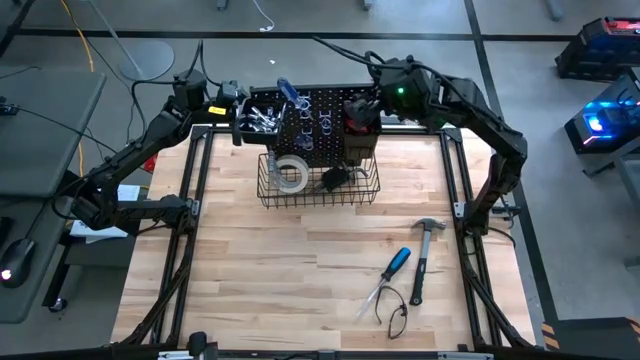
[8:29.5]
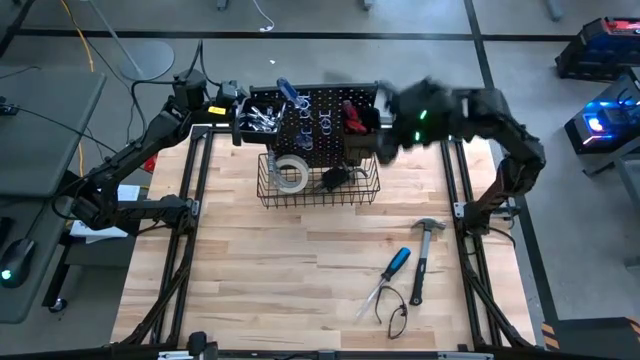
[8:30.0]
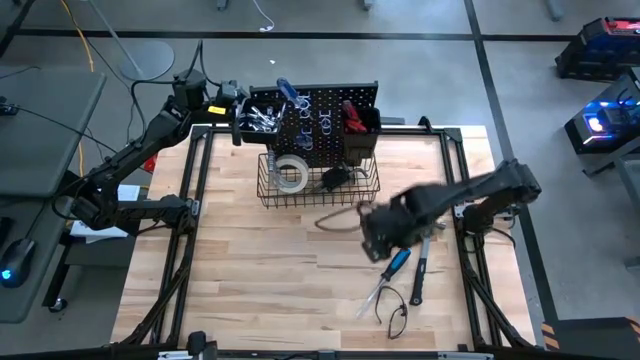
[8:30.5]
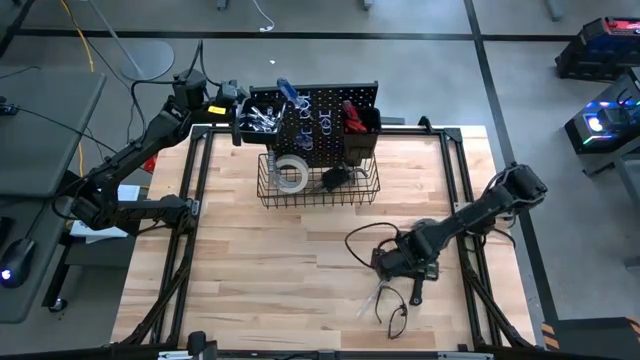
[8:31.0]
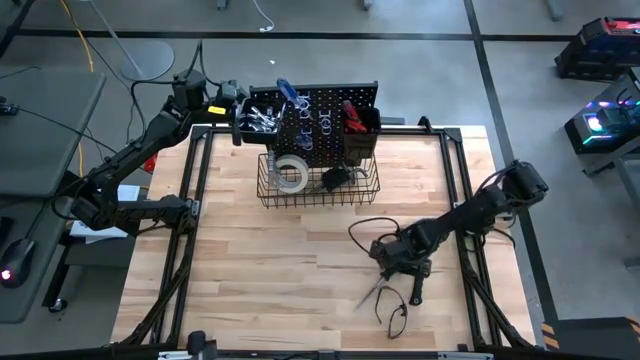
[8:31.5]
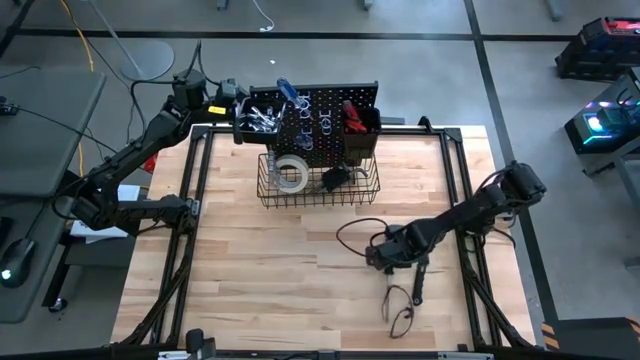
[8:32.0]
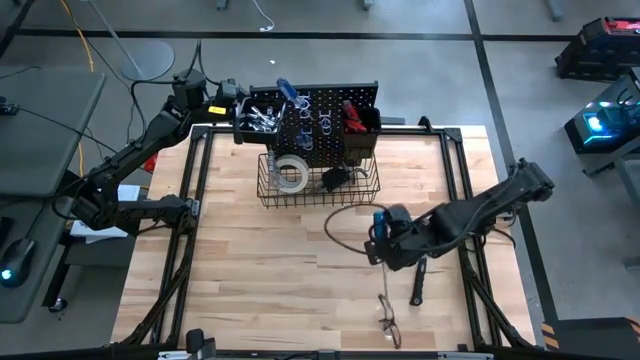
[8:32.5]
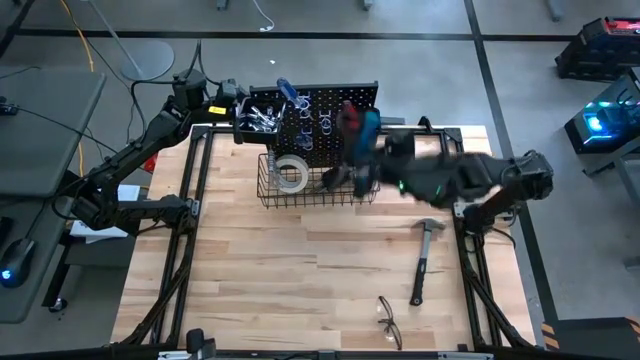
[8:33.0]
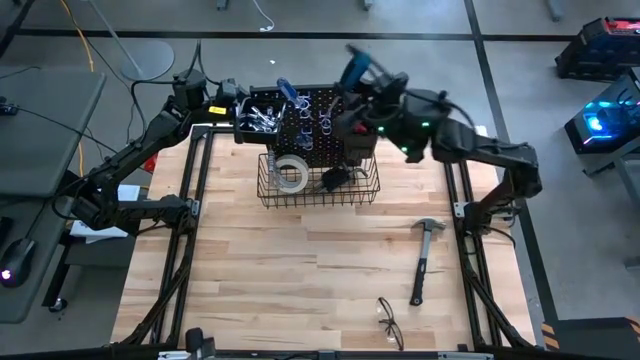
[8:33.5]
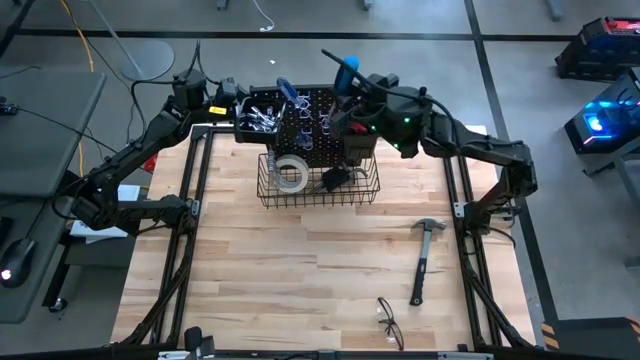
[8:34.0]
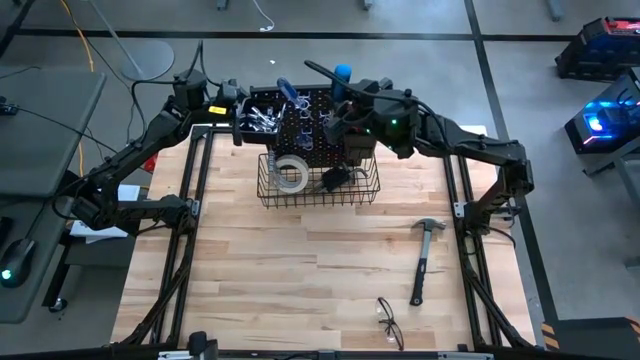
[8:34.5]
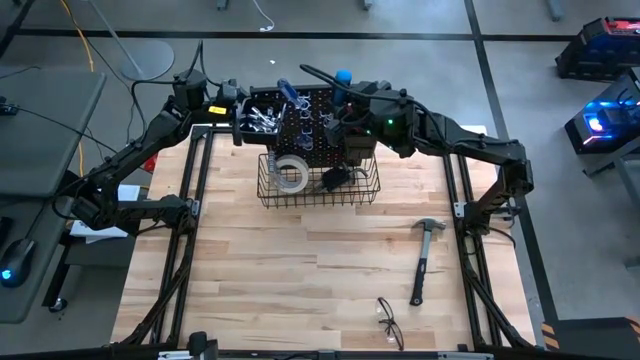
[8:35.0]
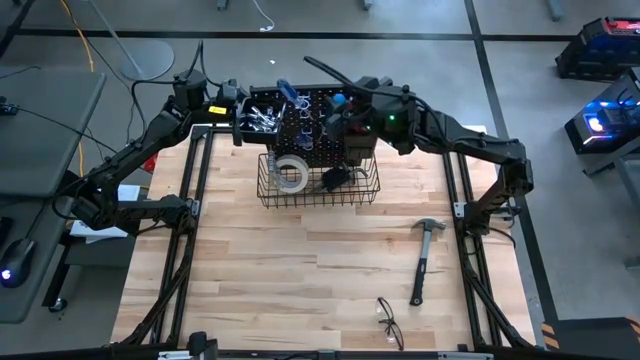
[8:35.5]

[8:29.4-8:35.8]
Task: Hang tools onto peg board
Hang the blue screwdriver on the peg board

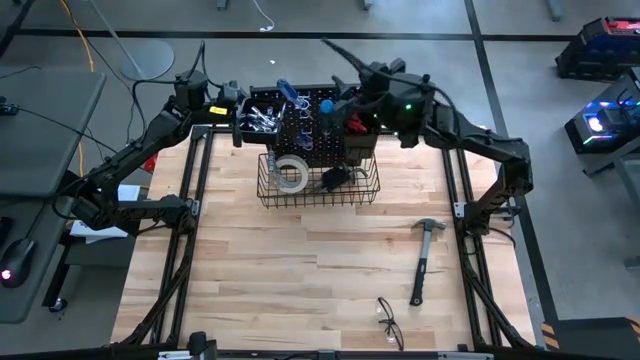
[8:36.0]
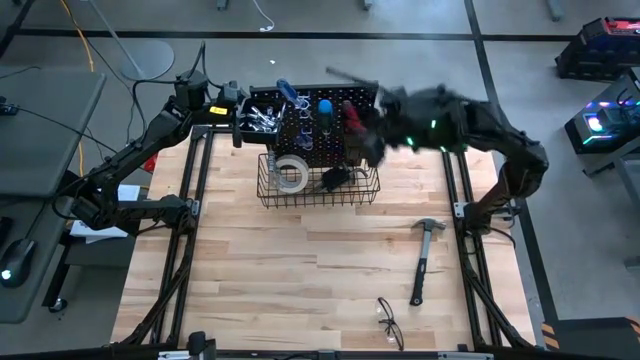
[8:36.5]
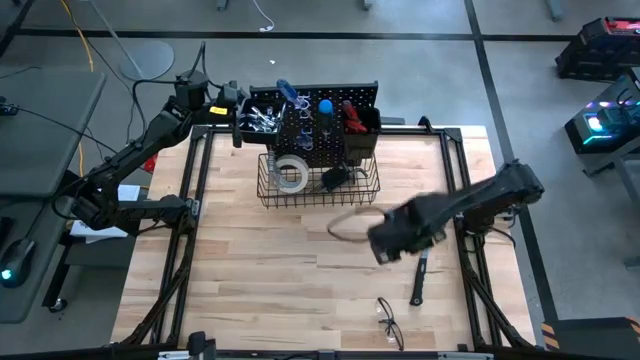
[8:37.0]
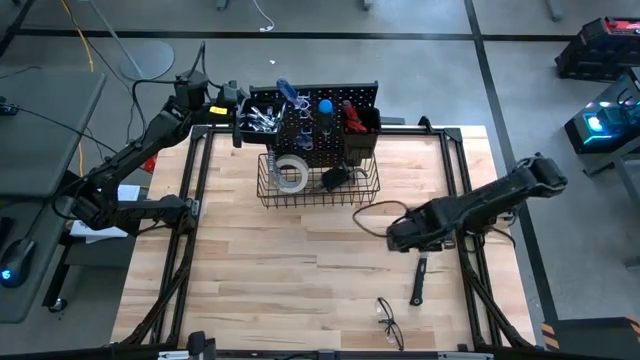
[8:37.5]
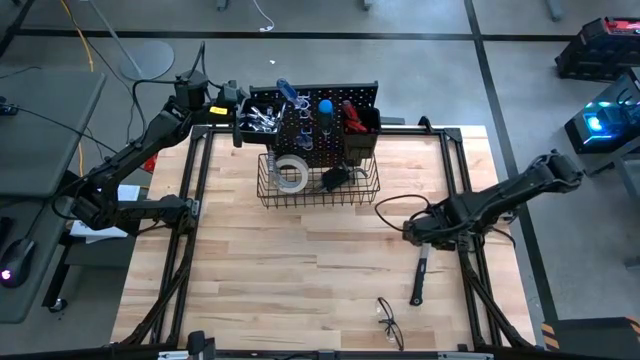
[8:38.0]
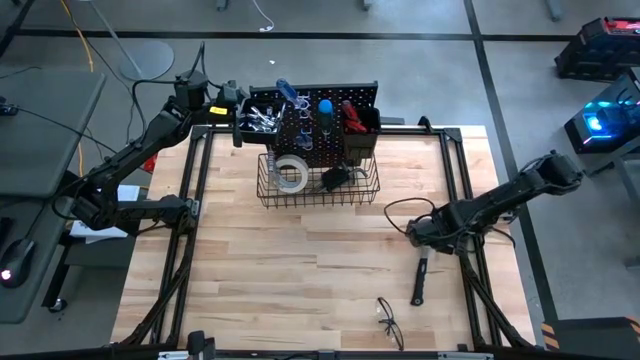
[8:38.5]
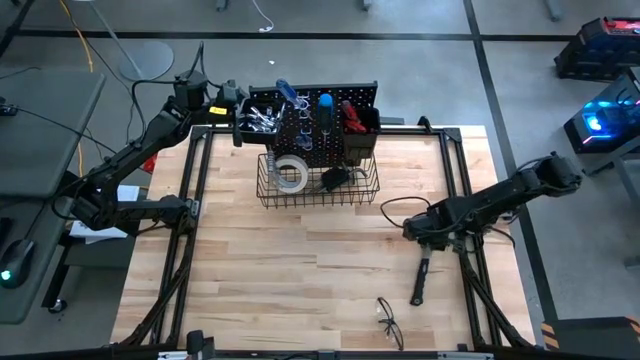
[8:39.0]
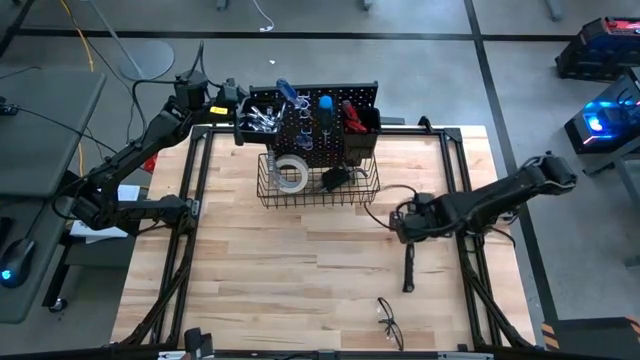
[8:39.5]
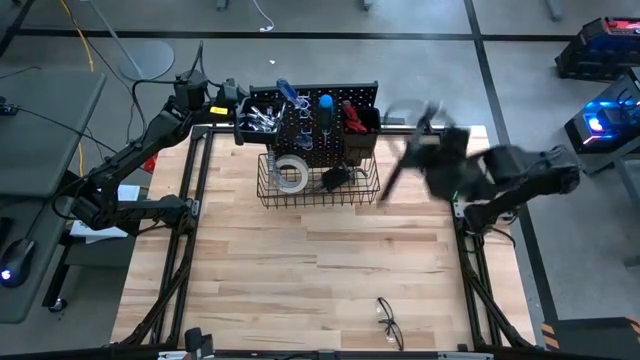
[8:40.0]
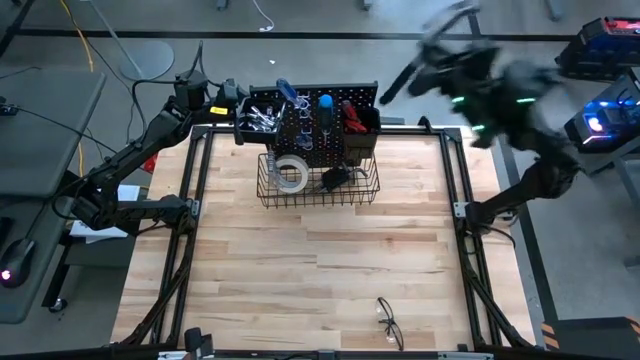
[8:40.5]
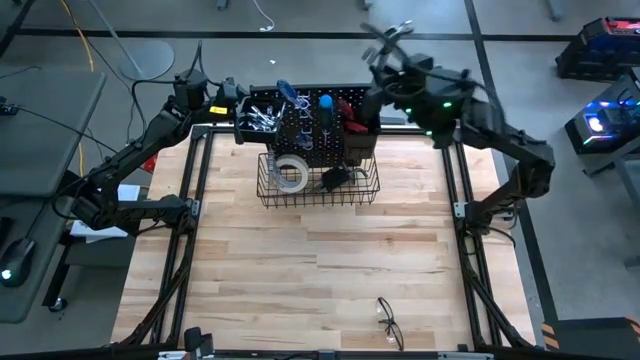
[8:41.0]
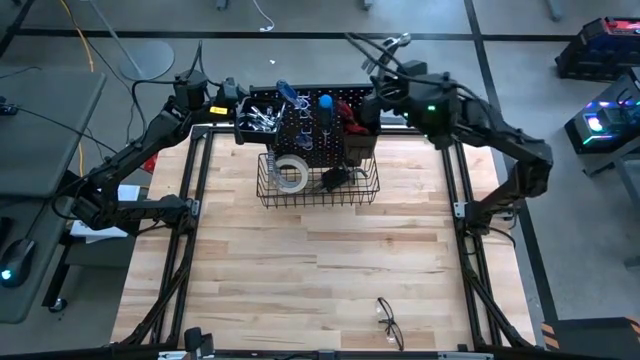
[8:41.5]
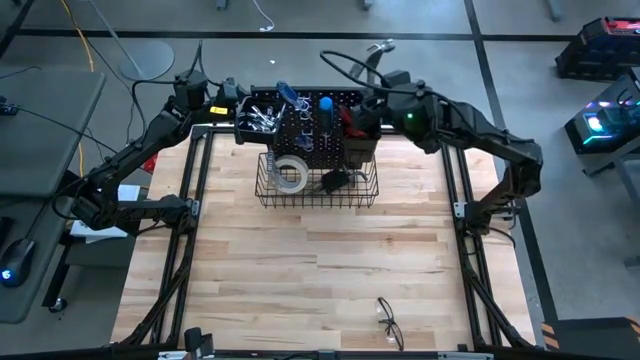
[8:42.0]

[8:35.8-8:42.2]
Put the hammer in the right black bin on the pegboard

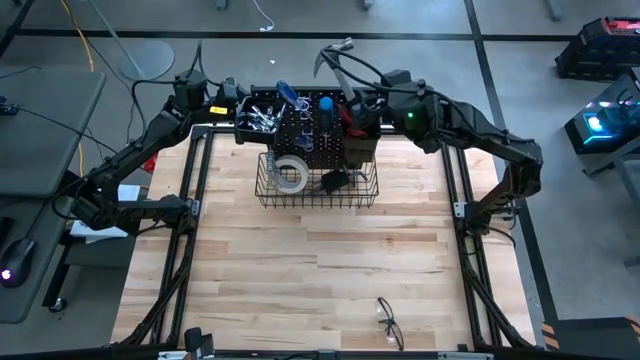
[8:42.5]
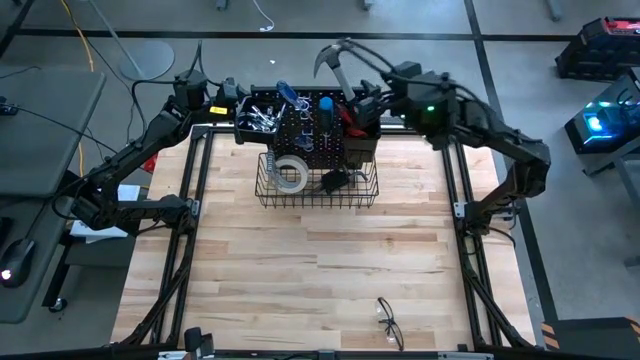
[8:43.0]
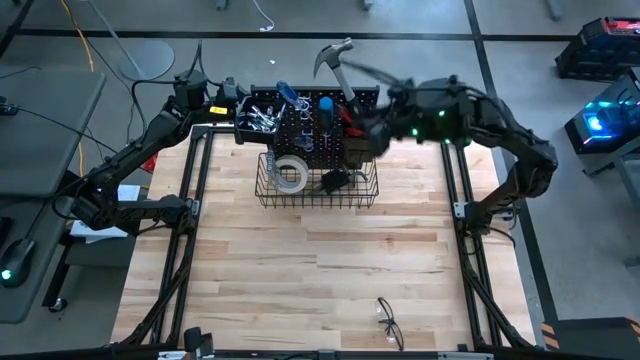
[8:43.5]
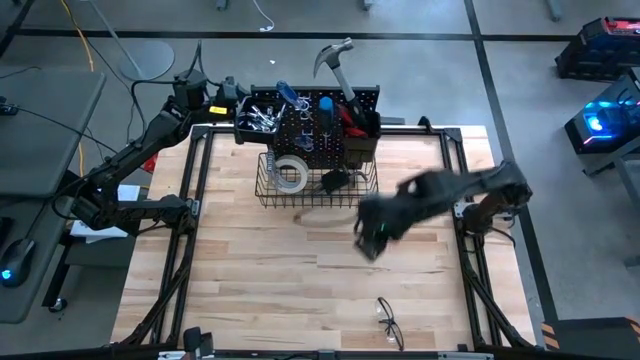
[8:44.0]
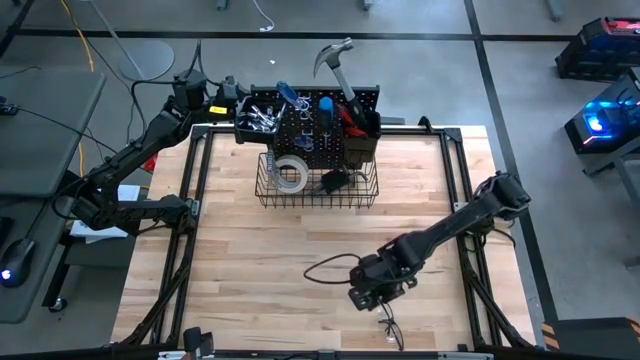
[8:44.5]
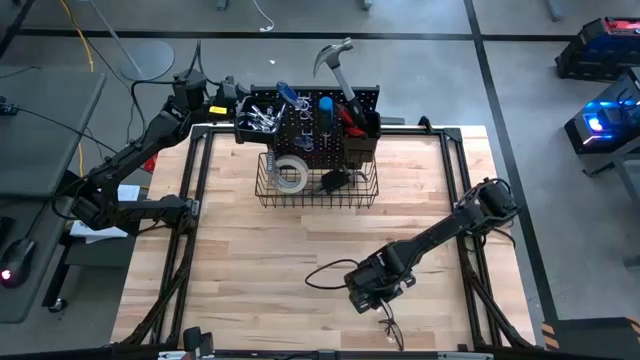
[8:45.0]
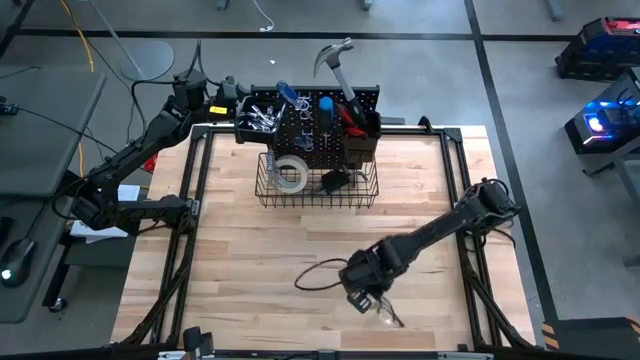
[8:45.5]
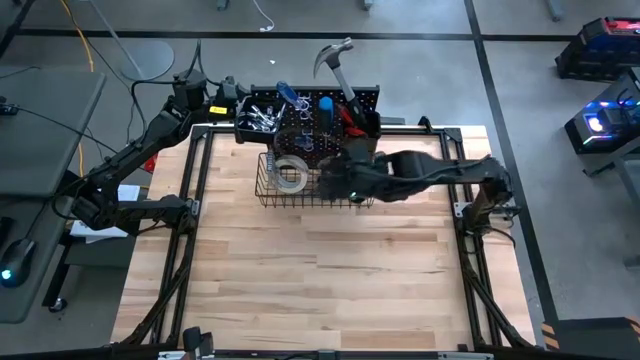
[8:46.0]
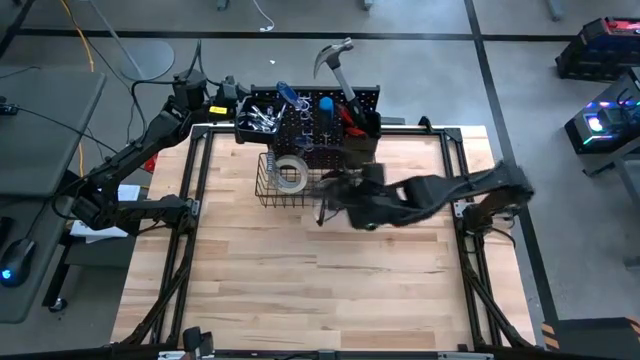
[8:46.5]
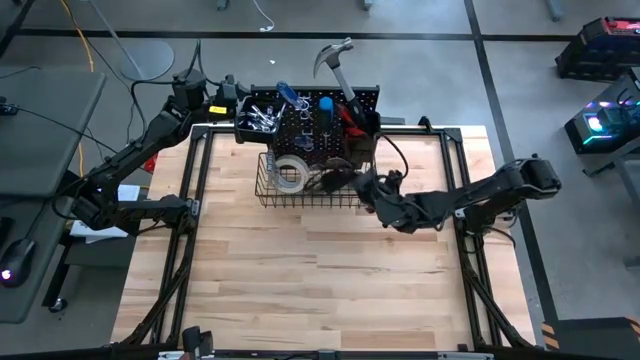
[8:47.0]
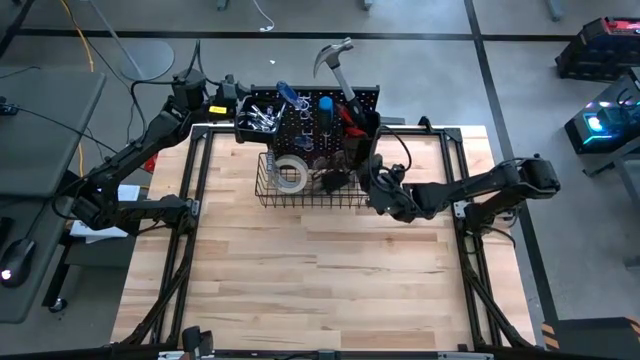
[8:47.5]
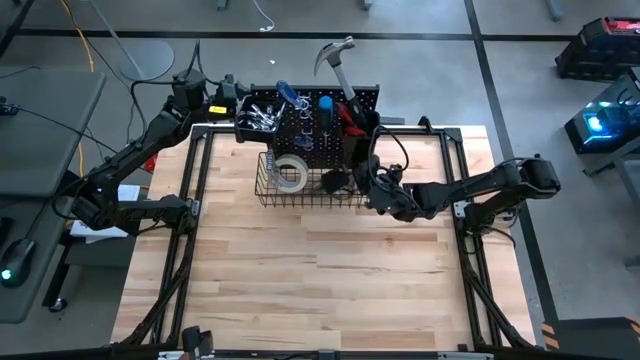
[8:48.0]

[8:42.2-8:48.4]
Put the safety glasses in the wire basket on the pegboard

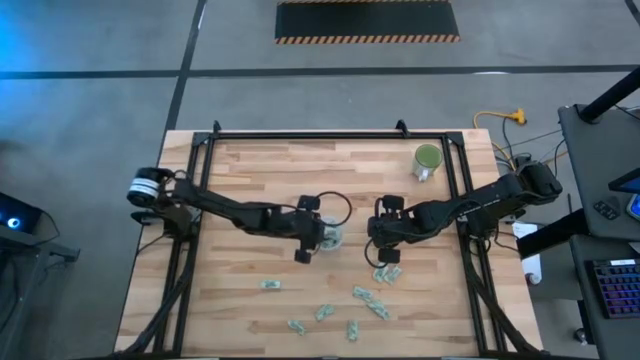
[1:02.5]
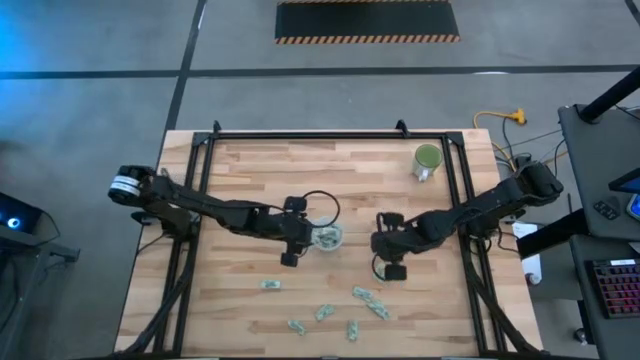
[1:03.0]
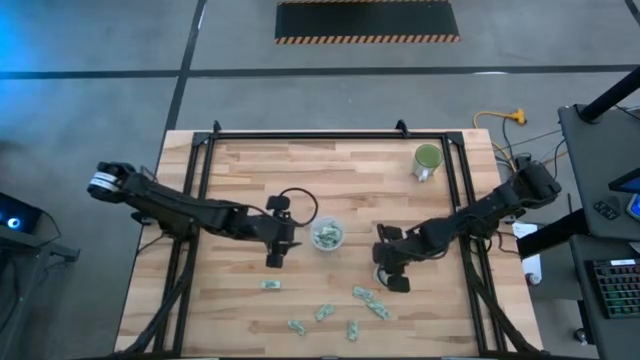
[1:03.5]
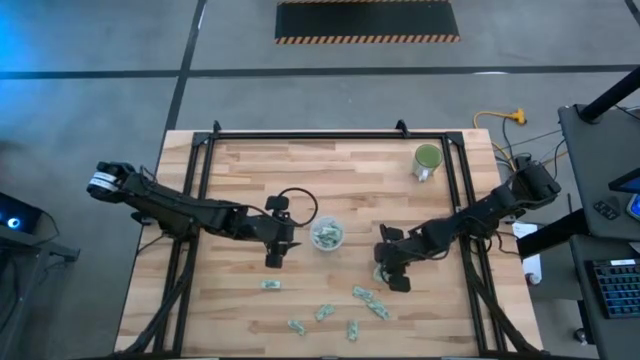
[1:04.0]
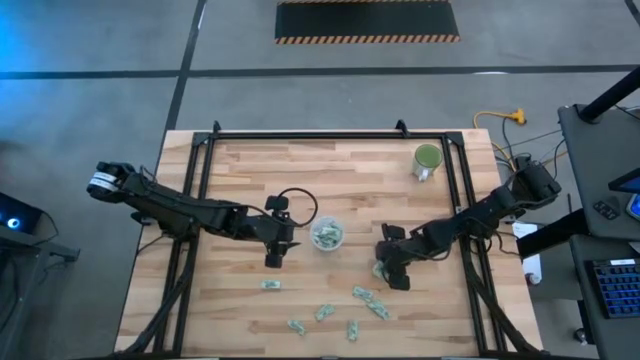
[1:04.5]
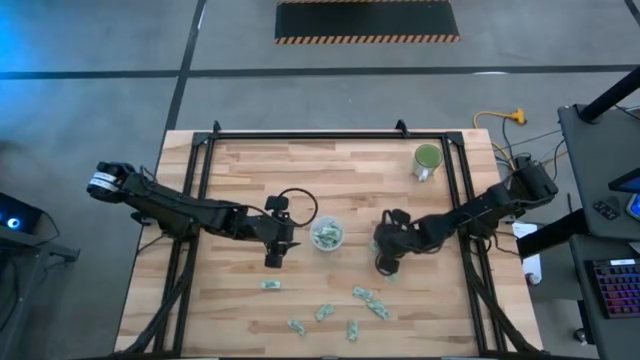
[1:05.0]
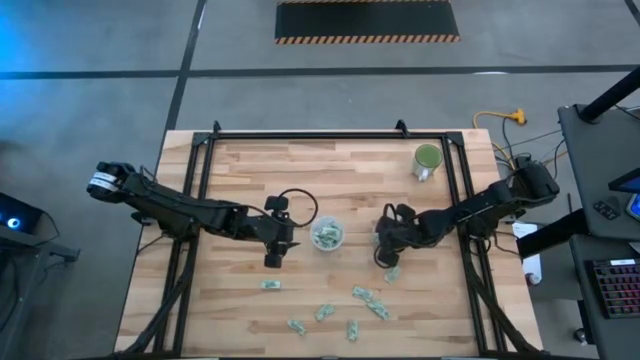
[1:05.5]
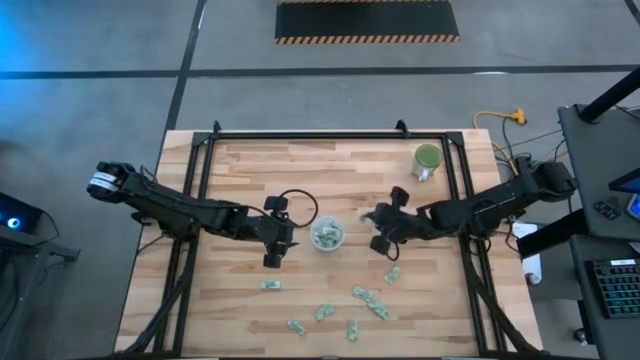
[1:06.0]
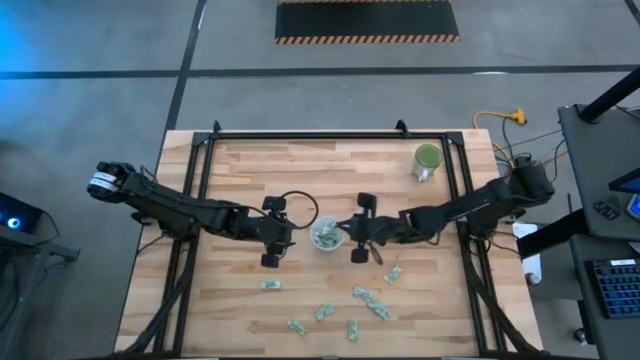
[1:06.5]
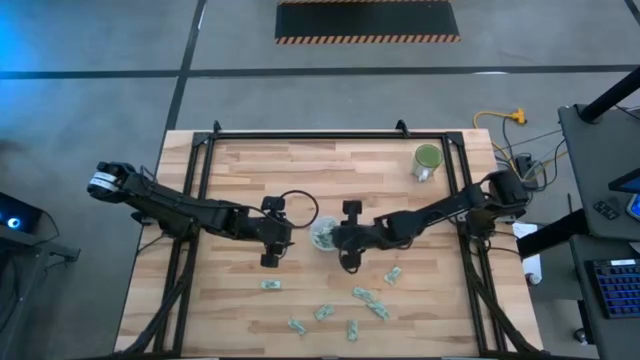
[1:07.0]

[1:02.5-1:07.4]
Task: Pick and place Stevia / Truvia into bins
Put the light green stevia packet into the transparent container
